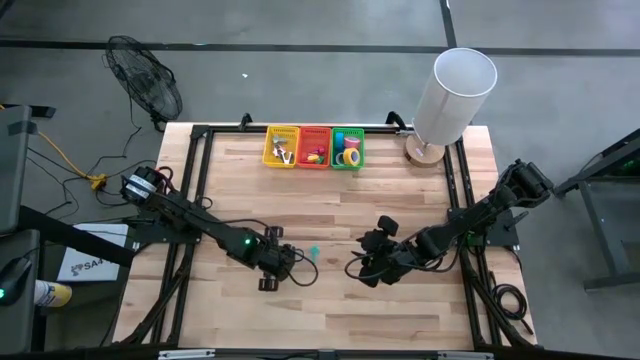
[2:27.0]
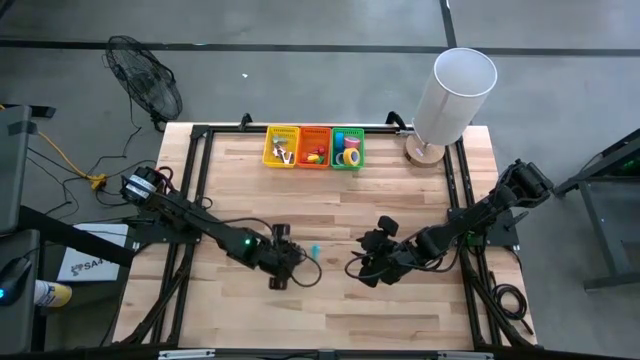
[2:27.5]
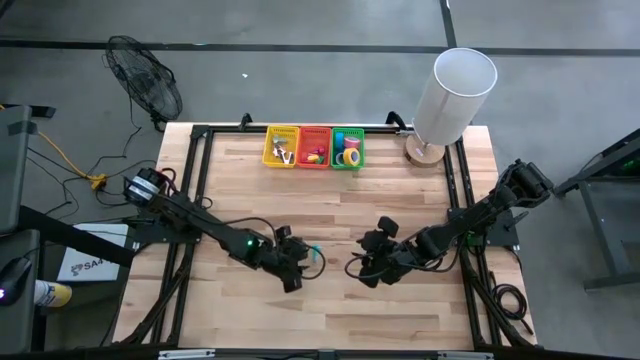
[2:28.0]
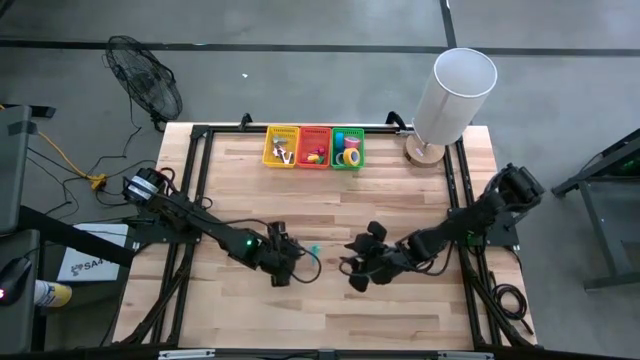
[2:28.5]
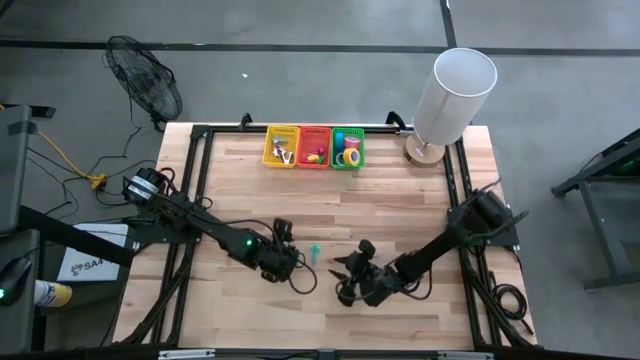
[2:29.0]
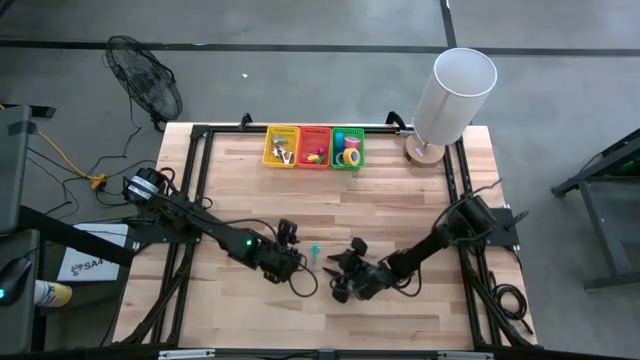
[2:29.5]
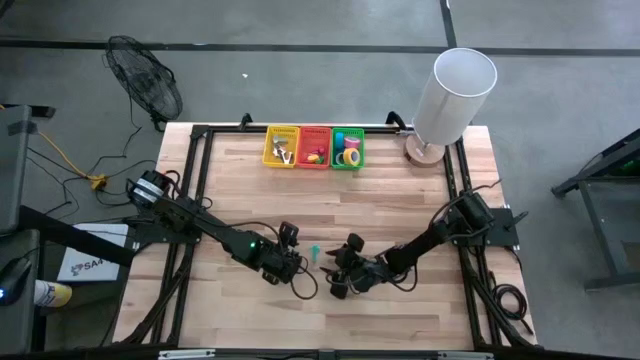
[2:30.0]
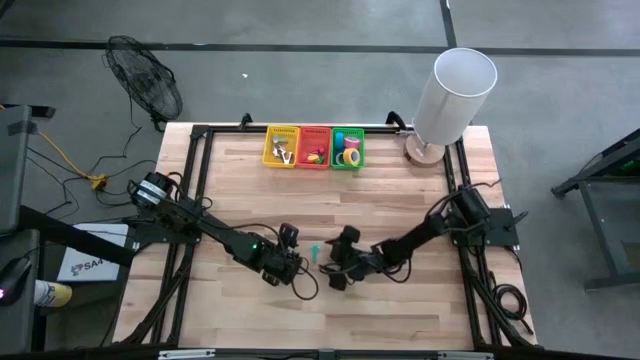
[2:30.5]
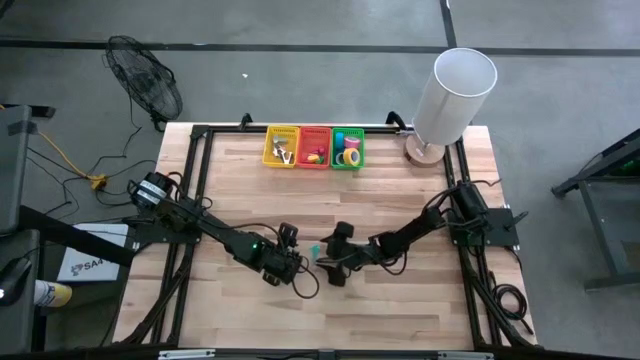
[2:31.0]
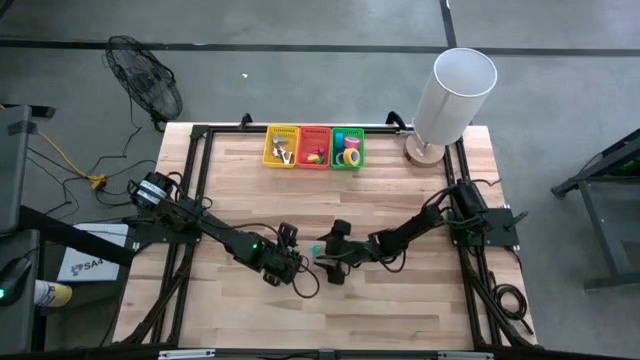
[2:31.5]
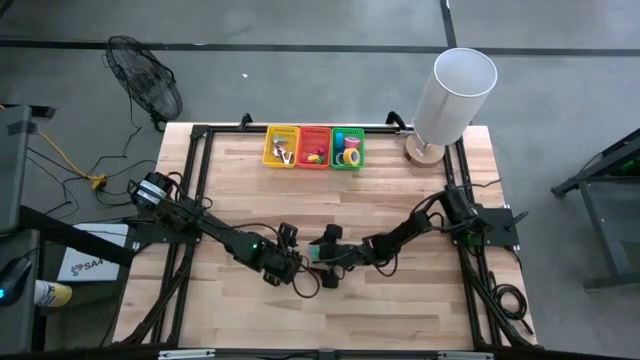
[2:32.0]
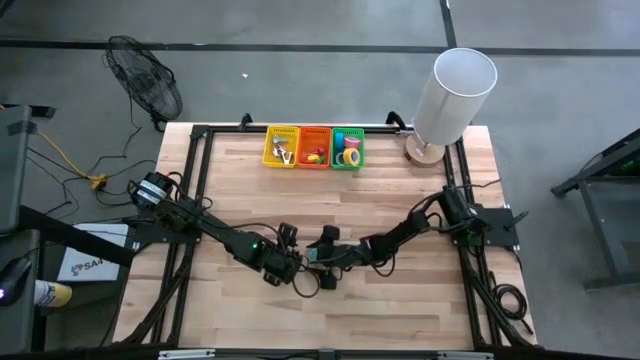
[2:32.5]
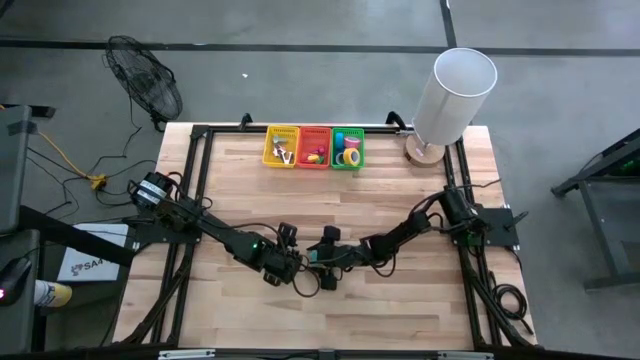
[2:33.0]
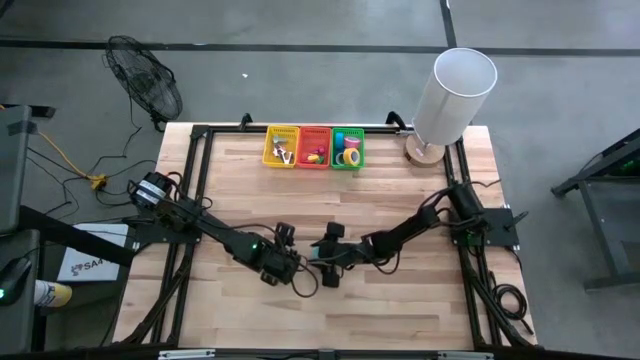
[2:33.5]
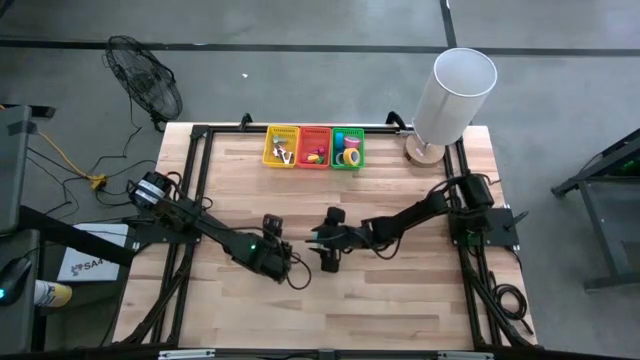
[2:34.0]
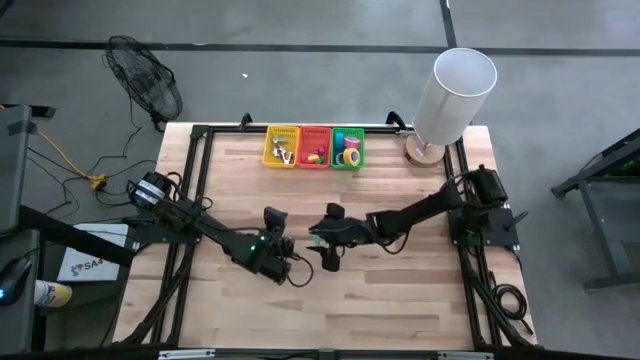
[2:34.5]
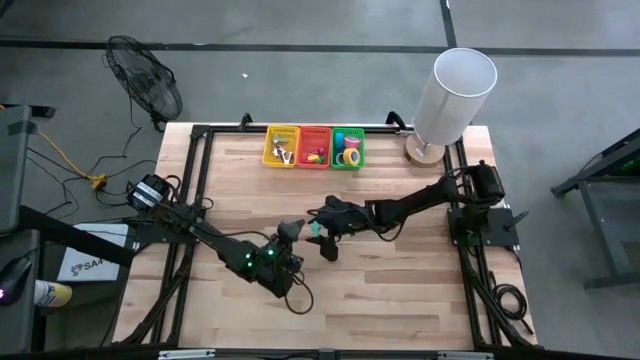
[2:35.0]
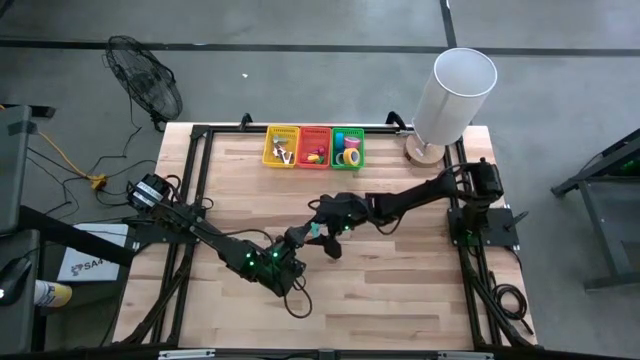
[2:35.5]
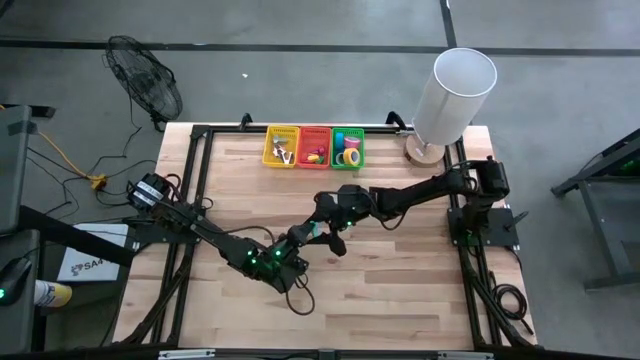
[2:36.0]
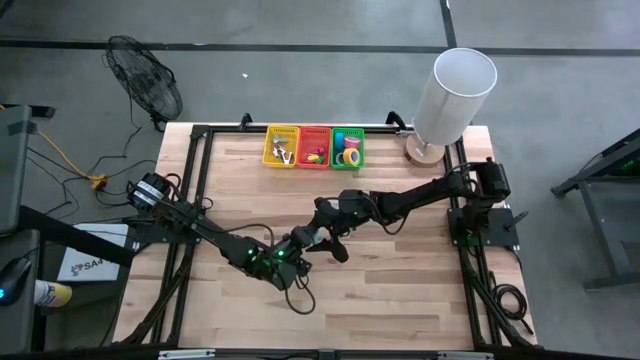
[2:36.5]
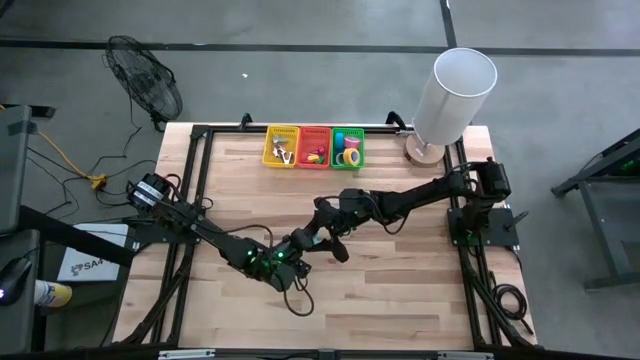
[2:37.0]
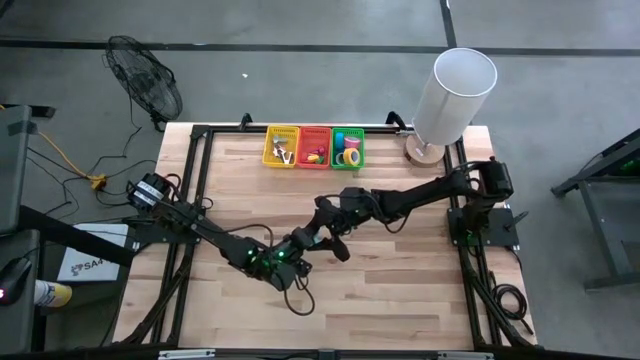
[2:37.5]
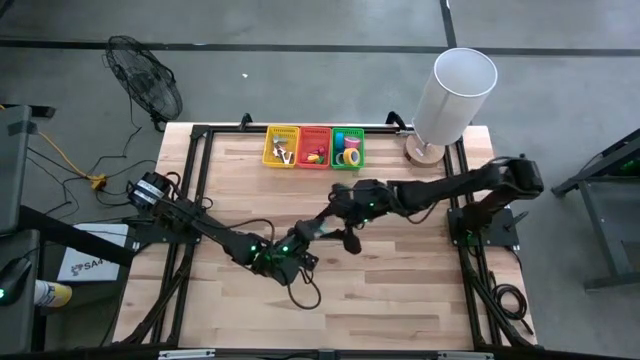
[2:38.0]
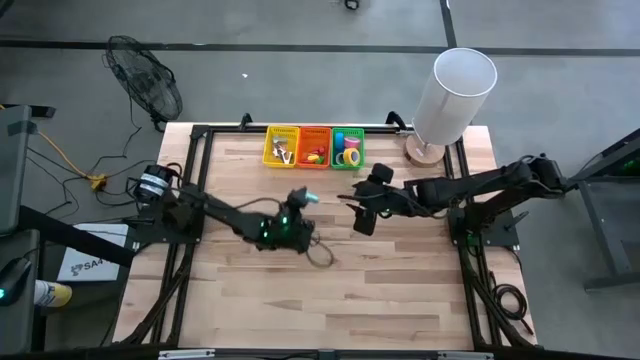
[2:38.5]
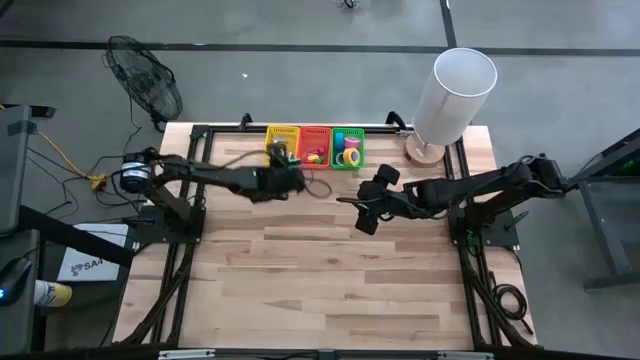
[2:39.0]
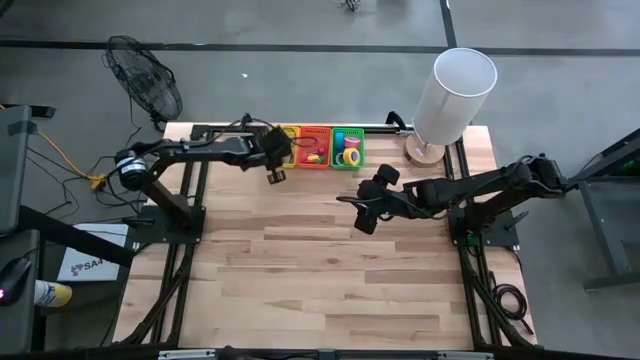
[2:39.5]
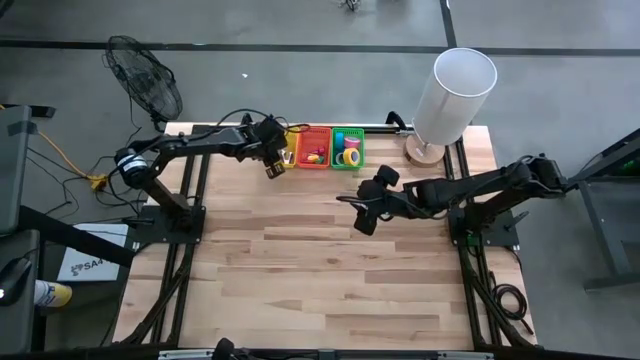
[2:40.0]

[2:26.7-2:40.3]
Task: Pick and place Stapler, Stapler remover, tape
Put the light blue staple remover into the yellow basket

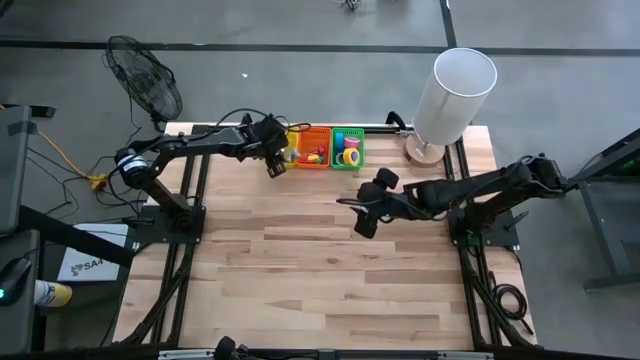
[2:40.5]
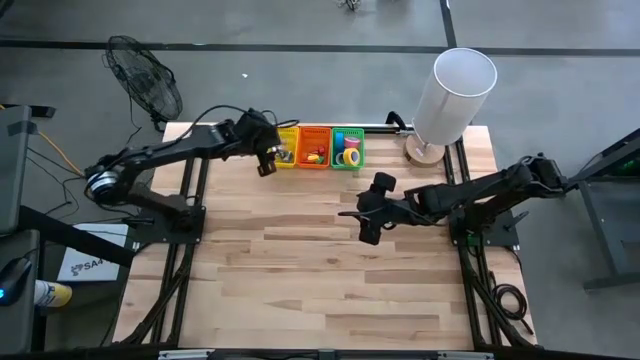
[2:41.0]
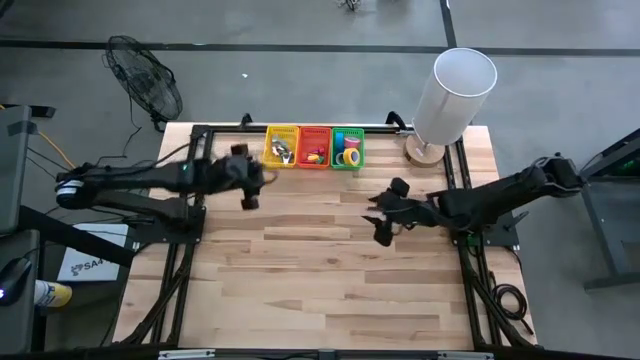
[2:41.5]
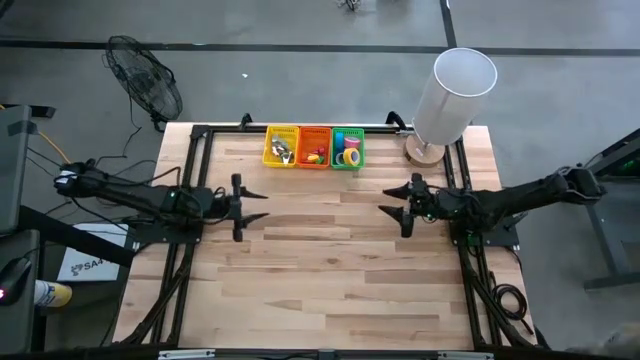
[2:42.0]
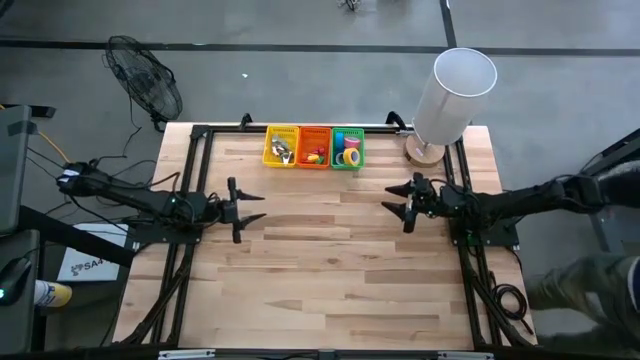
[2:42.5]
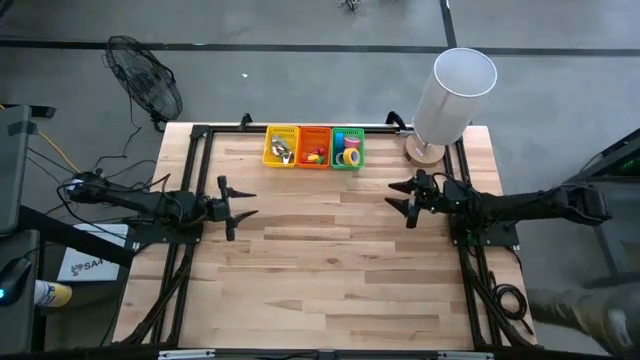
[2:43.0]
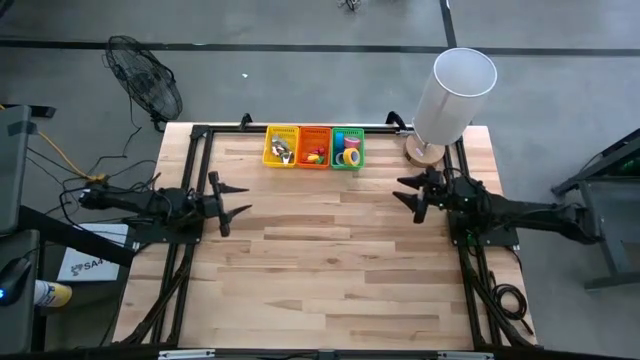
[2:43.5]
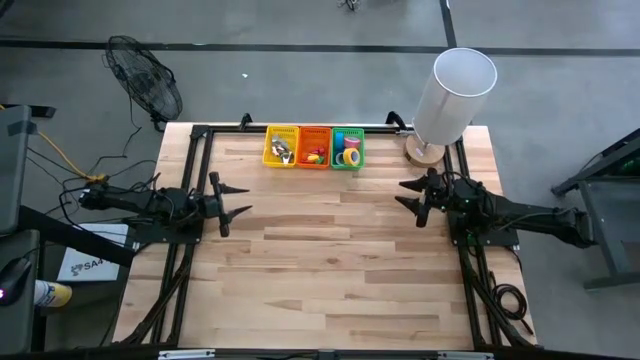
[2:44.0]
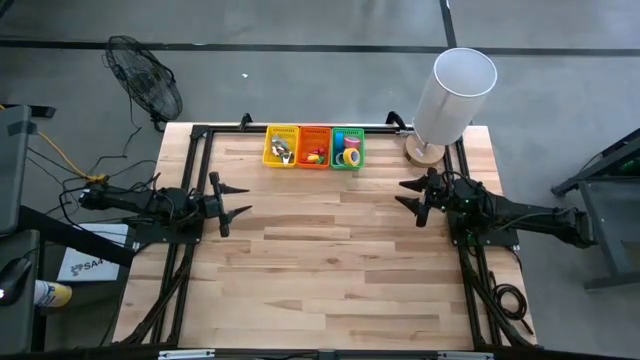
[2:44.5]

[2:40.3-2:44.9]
Return to Home Position

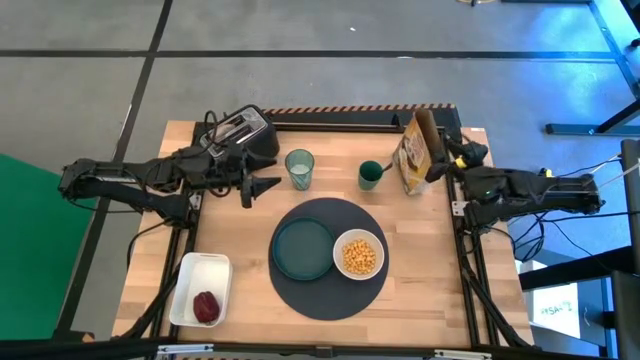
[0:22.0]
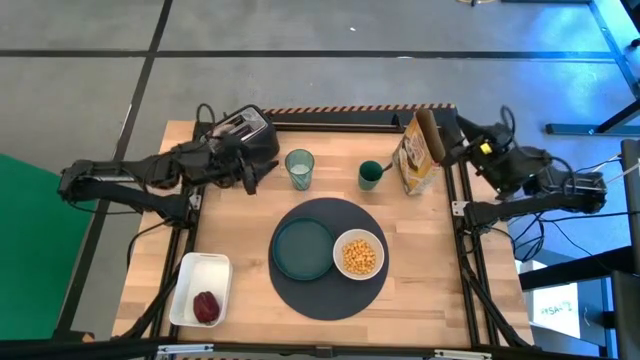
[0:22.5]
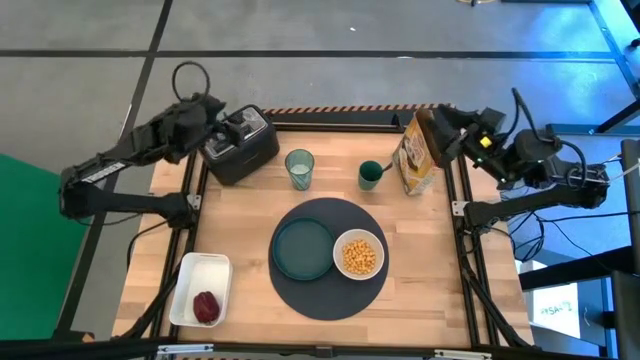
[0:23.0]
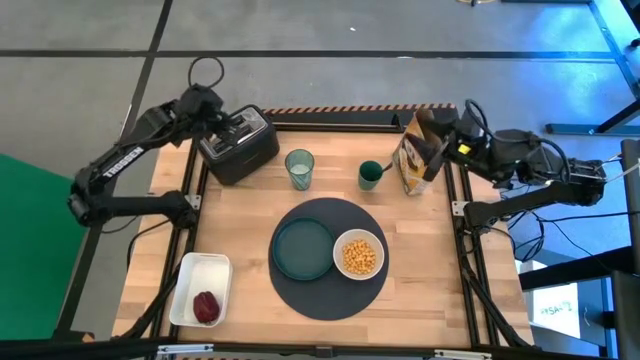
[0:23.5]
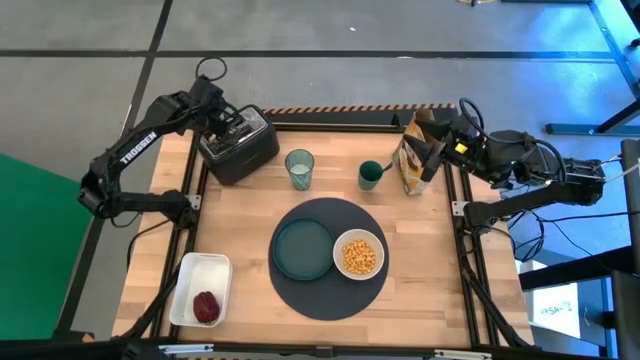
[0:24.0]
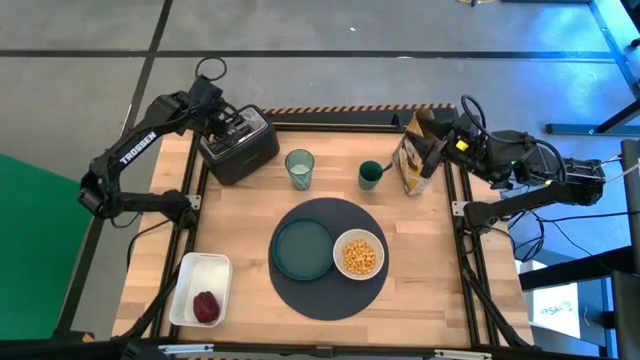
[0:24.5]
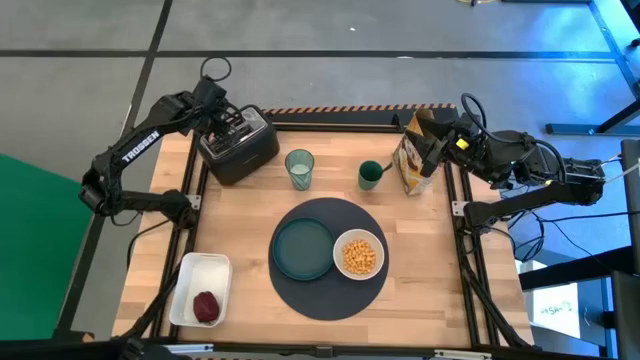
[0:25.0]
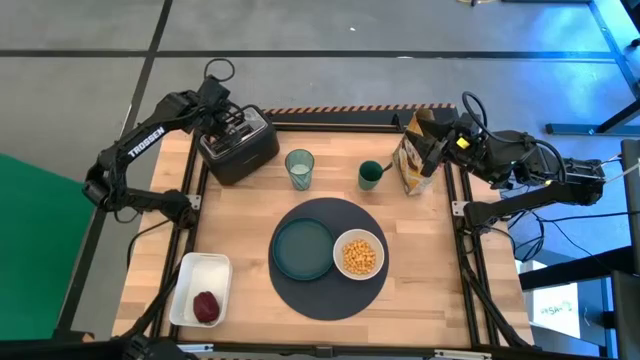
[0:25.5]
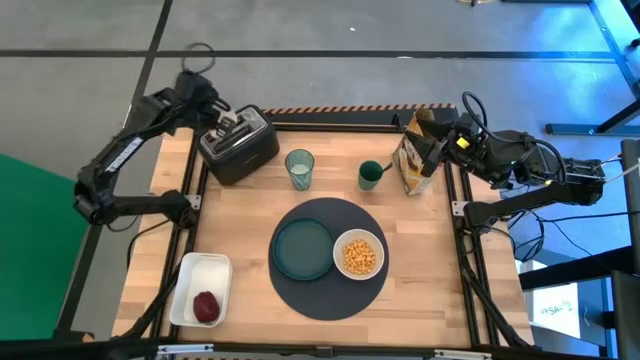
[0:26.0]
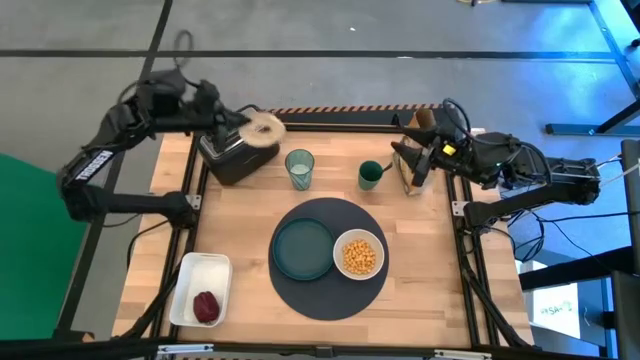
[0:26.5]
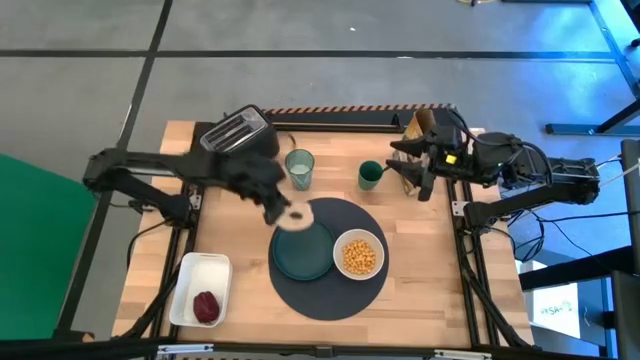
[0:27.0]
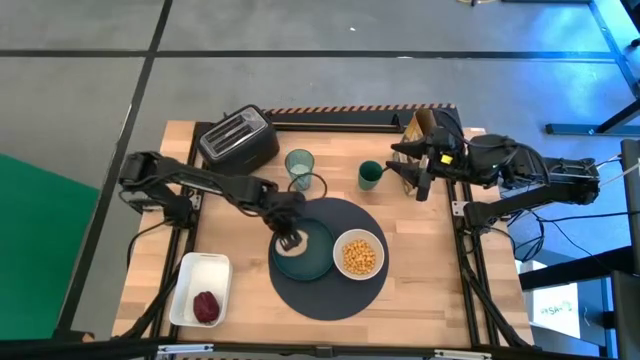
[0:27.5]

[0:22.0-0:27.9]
Task: Arrange a breakfast setting
Put the bagel on the blue plate
